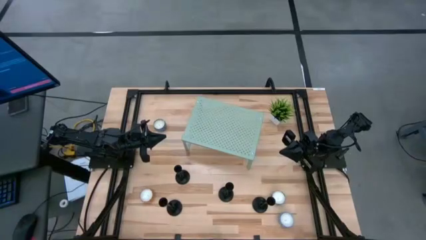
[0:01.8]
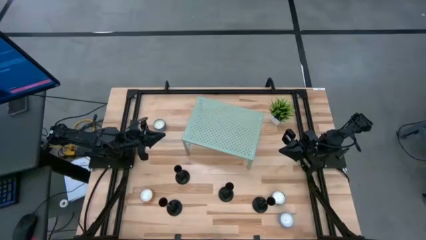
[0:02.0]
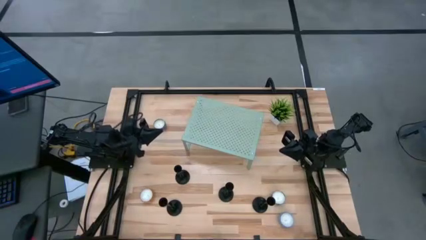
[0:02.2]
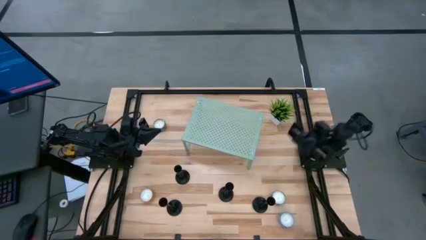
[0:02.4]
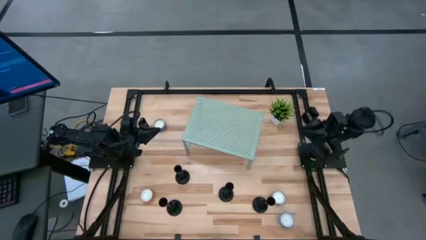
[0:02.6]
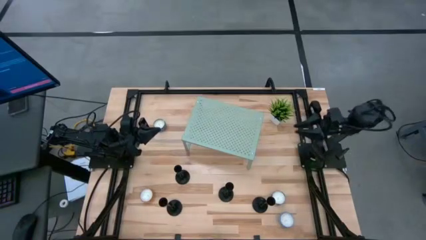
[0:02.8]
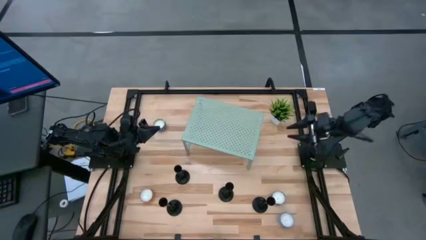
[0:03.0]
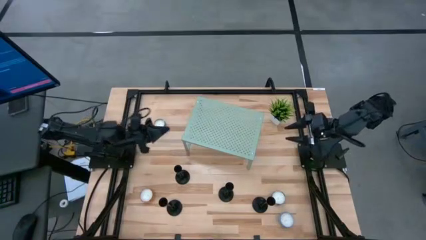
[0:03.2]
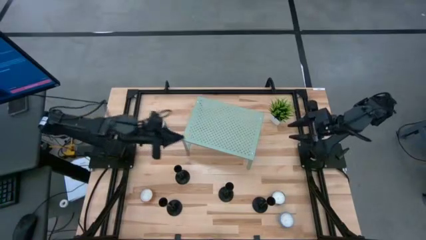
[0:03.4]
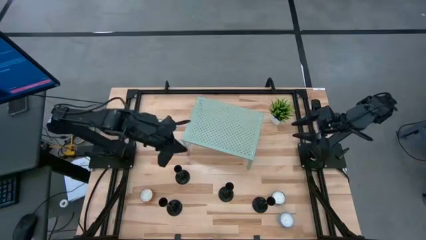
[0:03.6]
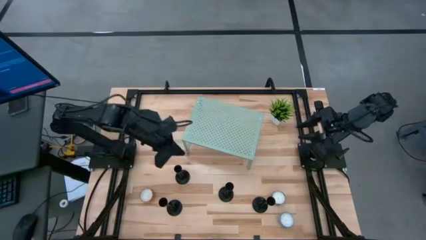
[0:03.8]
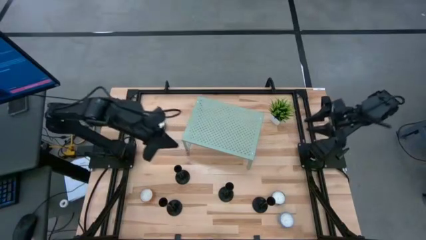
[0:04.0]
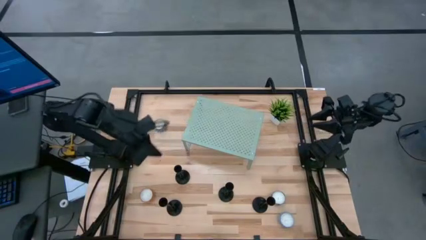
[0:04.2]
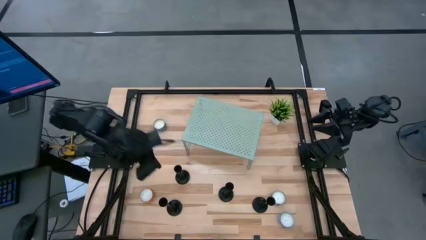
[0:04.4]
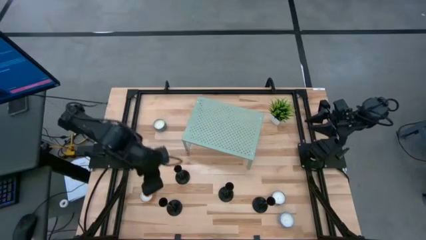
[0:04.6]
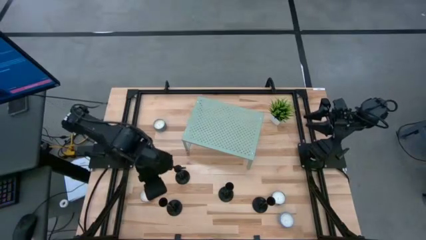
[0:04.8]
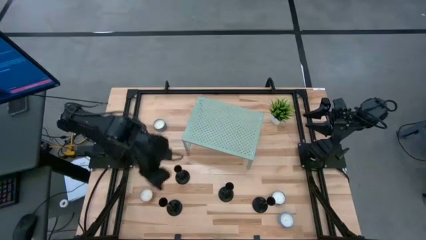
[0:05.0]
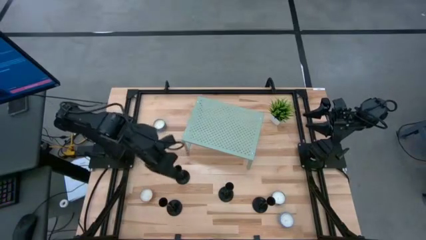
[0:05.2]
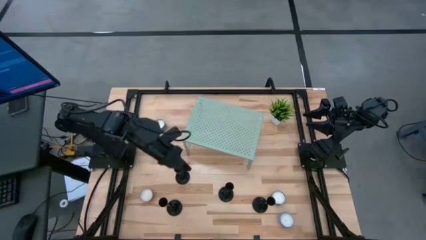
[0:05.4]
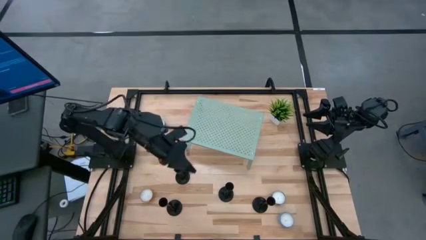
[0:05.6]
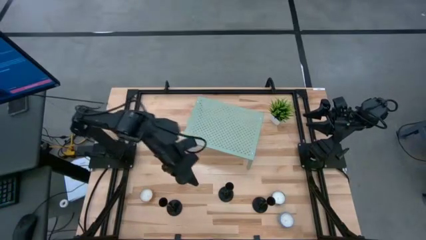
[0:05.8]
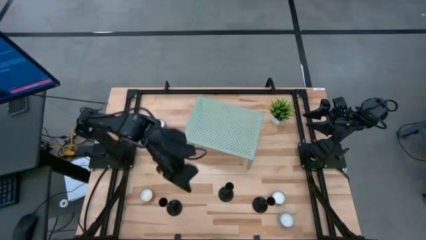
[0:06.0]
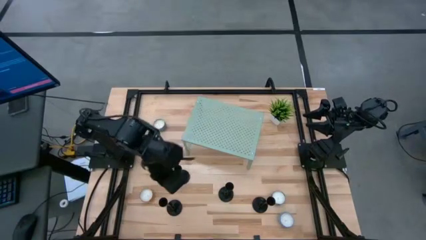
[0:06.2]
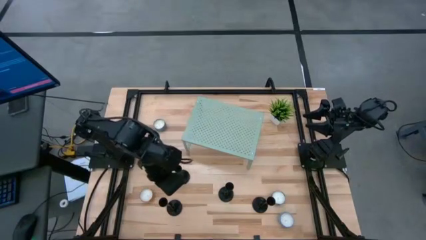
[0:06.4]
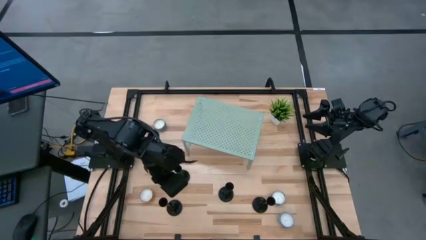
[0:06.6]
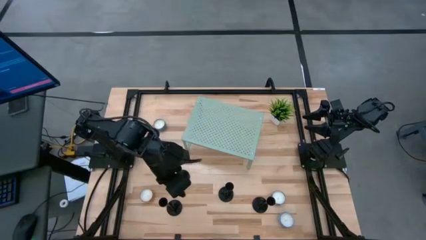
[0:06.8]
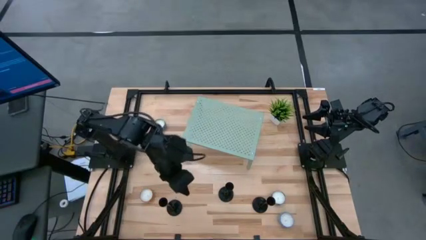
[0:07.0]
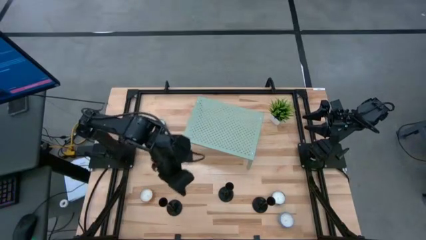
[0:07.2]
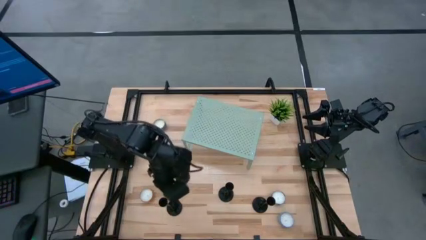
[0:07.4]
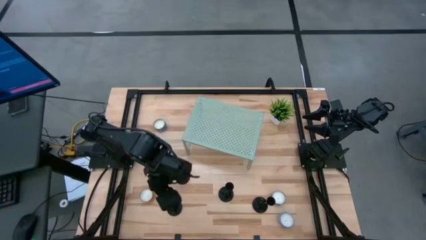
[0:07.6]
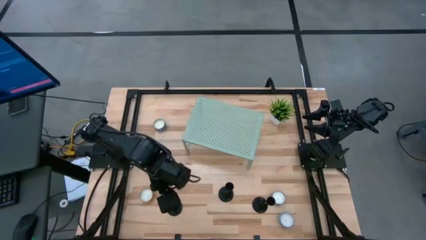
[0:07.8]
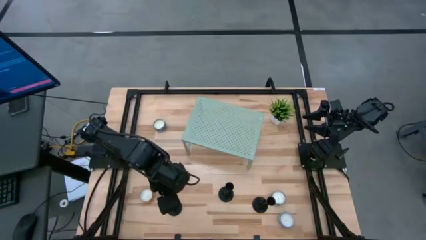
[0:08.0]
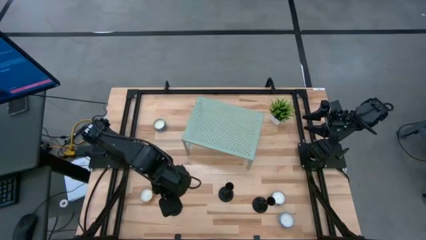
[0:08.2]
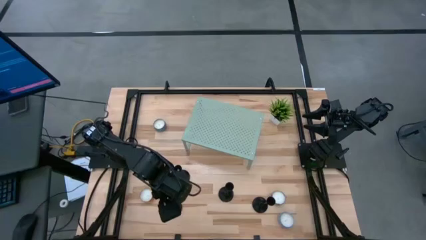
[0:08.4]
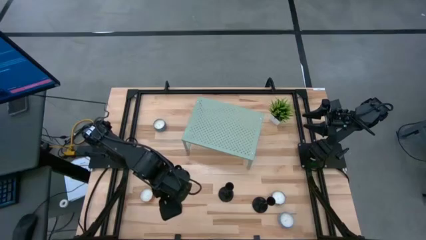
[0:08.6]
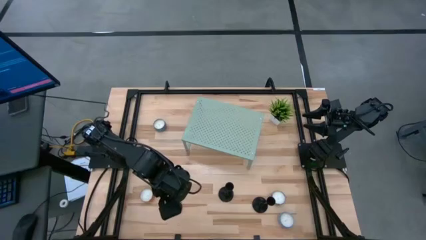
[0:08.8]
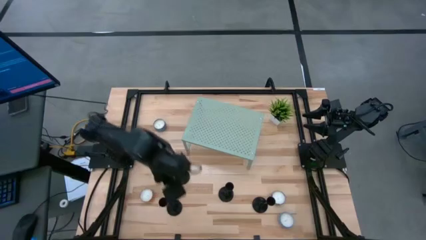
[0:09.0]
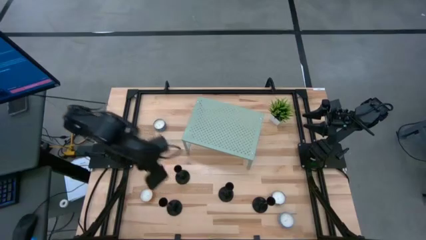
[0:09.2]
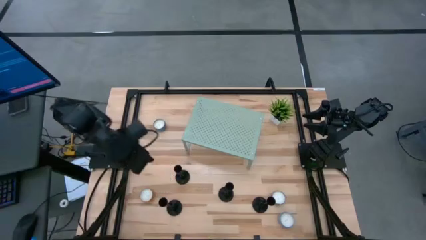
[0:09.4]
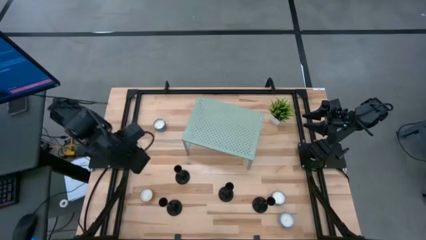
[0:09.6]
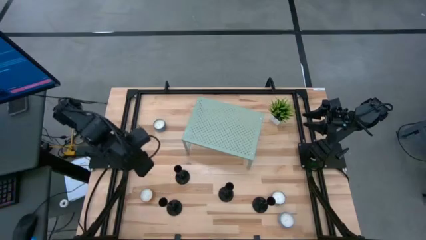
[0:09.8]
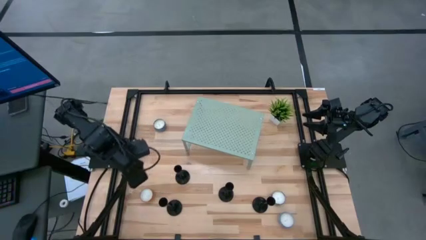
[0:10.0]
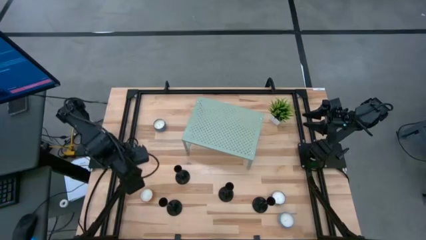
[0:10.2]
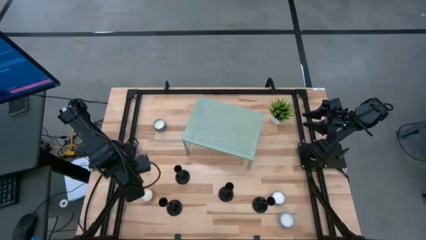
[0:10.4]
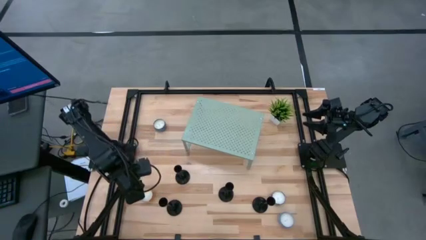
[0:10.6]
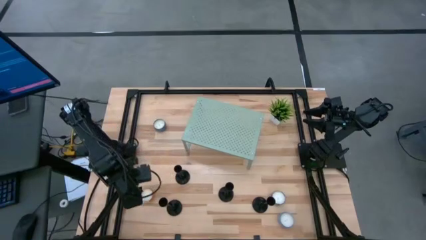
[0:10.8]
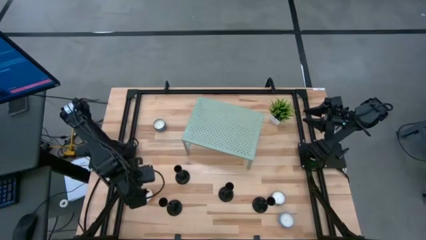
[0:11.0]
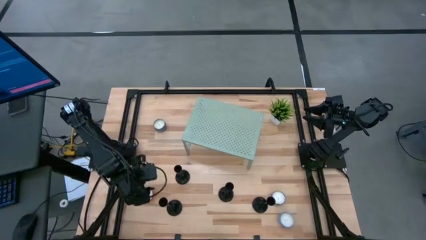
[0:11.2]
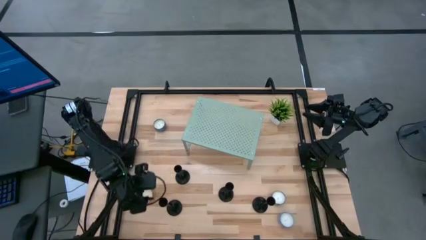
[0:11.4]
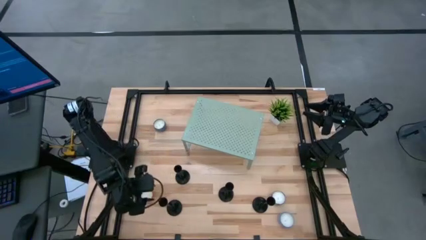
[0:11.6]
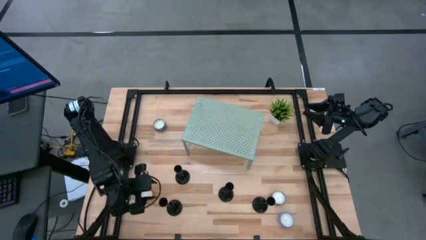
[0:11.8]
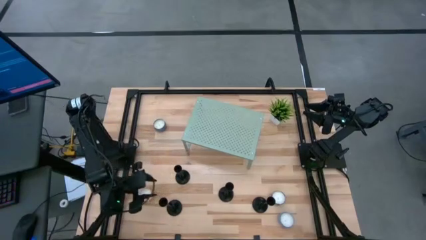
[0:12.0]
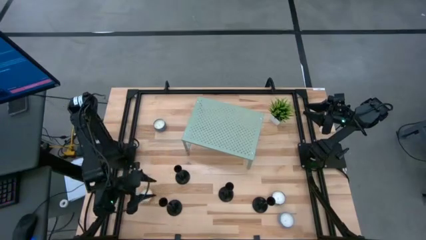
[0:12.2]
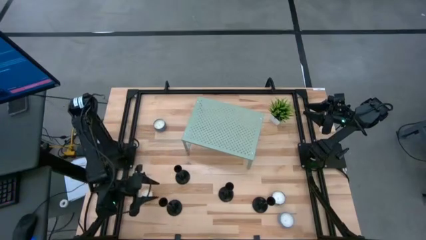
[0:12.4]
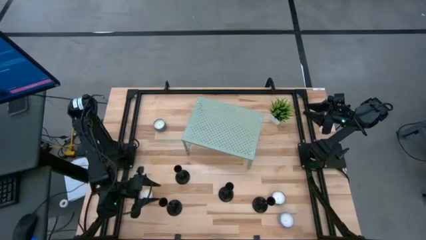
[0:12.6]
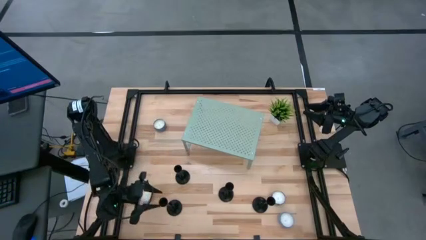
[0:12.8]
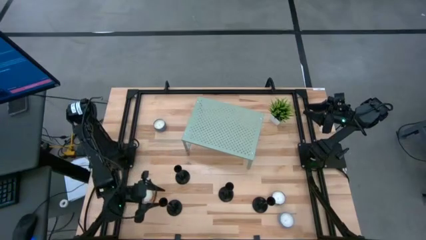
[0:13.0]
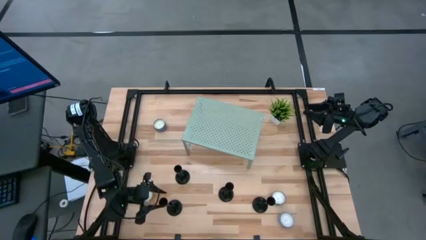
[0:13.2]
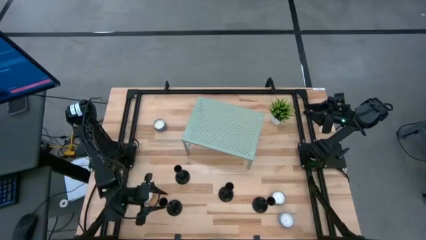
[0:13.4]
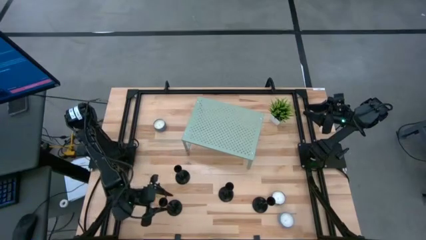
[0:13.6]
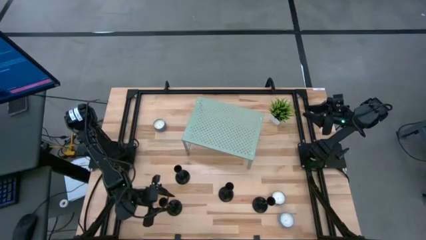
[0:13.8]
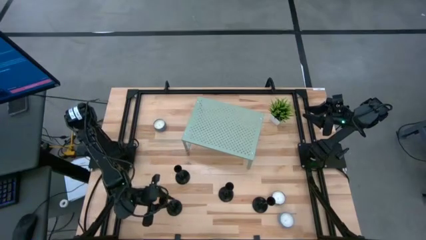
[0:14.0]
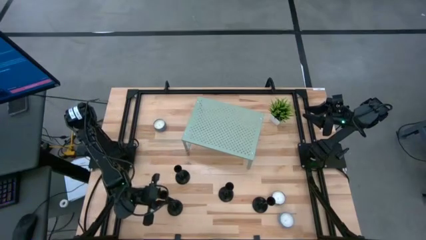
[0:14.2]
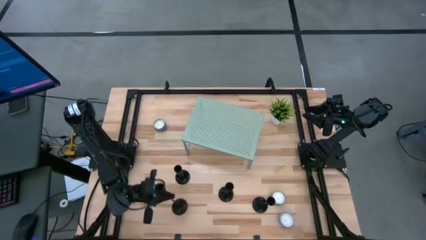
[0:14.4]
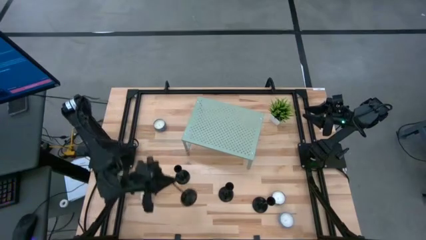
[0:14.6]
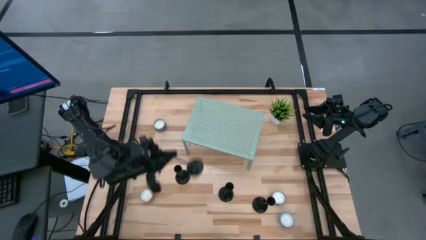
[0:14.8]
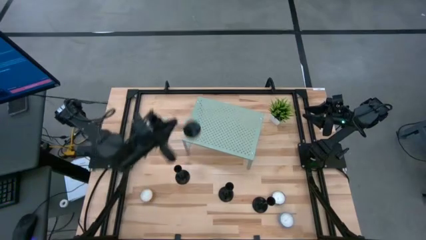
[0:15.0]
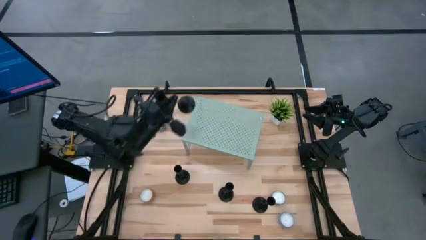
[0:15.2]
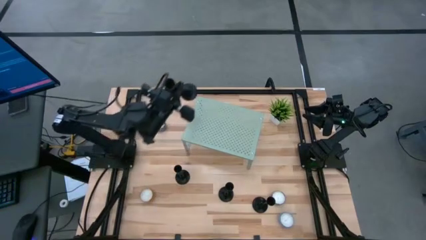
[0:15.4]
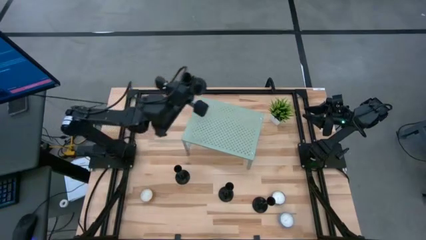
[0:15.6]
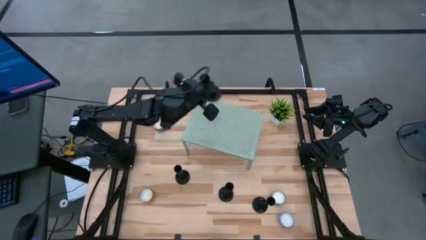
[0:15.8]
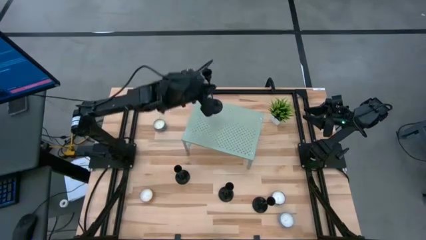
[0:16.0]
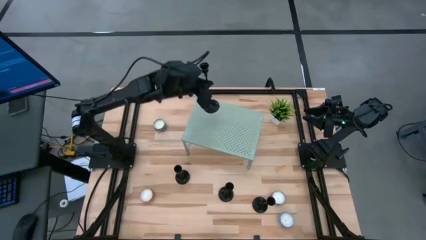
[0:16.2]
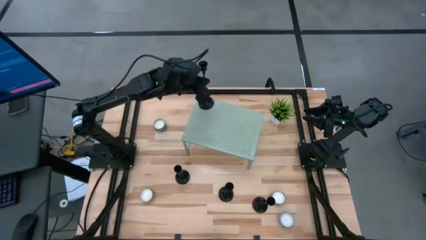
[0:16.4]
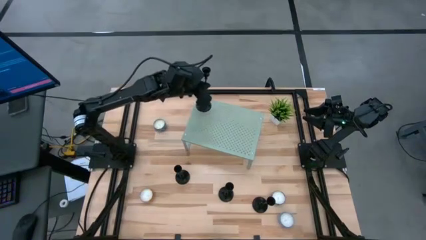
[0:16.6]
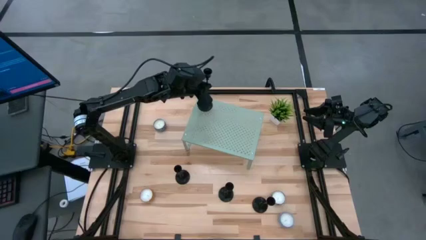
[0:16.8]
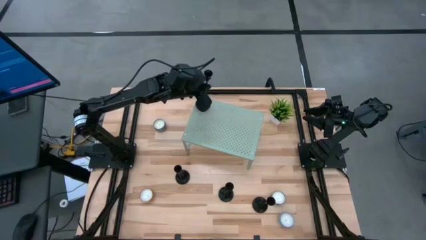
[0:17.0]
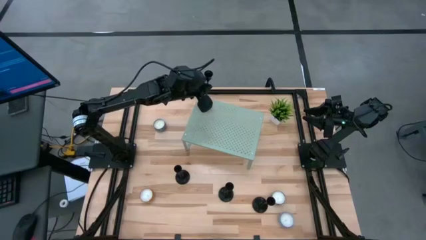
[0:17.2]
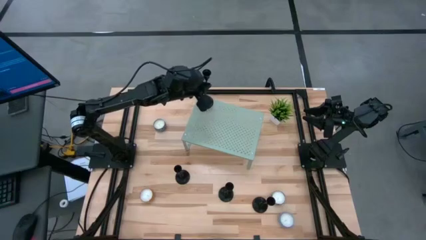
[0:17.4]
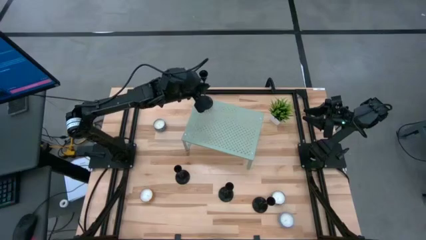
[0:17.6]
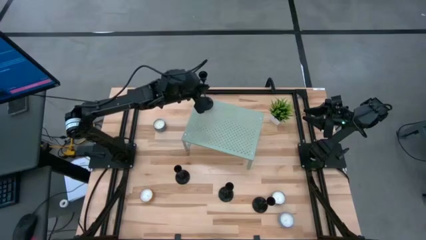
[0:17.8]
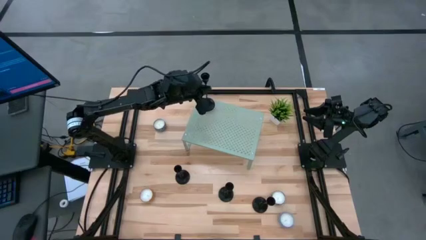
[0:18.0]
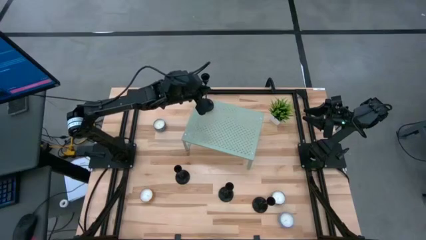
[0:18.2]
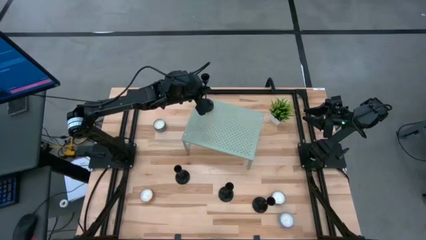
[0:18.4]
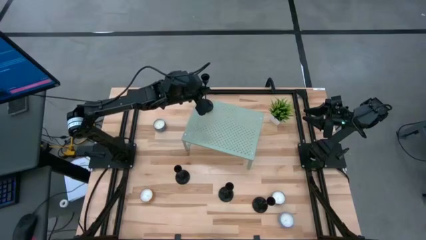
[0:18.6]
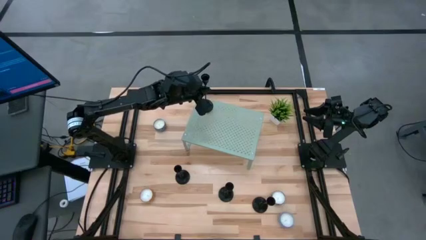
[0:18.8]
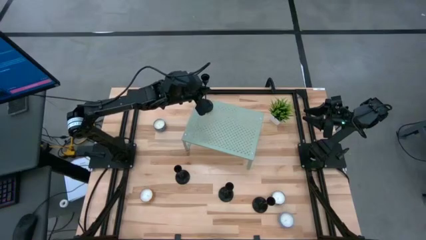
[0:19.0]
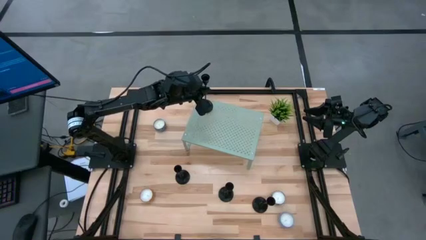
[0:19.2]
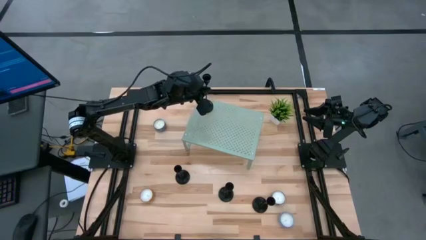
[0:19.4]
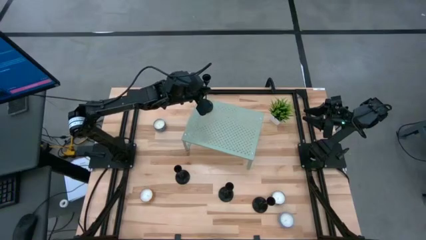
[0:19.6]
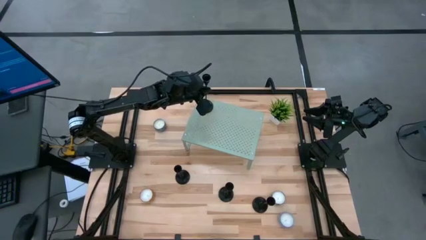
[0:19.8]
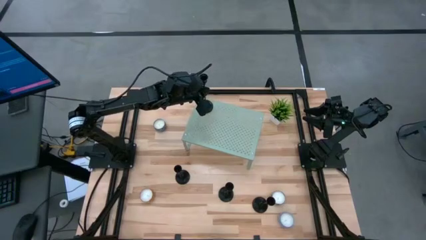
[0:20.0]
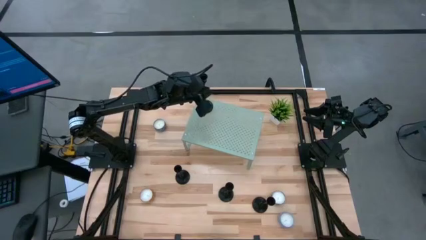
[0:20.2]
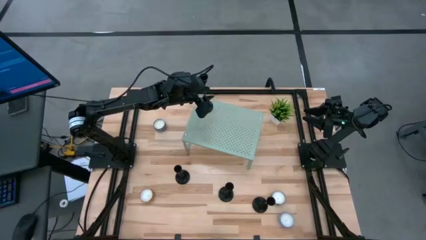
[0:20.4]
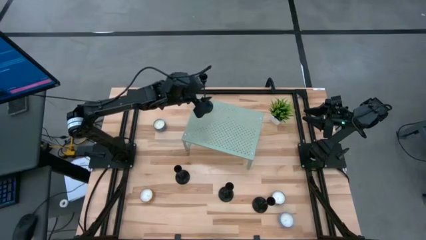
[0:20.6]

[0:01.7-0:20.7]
Task: Pick & Place candle stick holders
Put the black candle holder on the shelf
